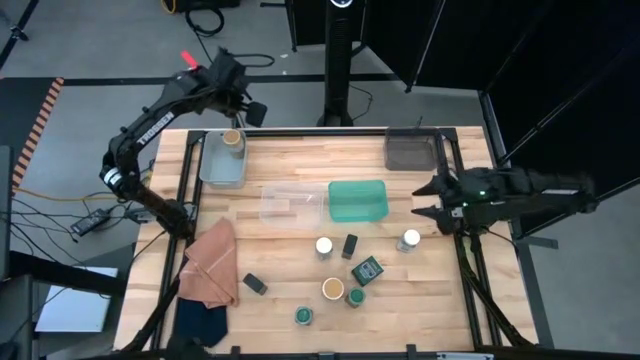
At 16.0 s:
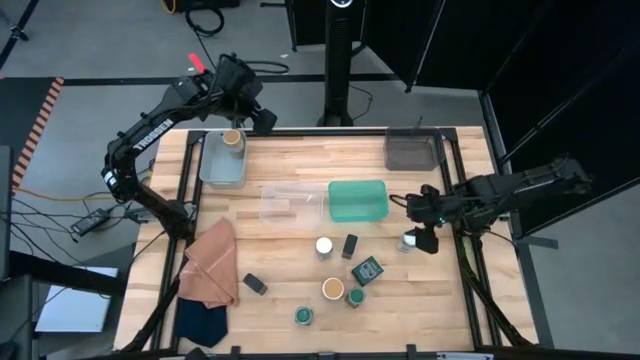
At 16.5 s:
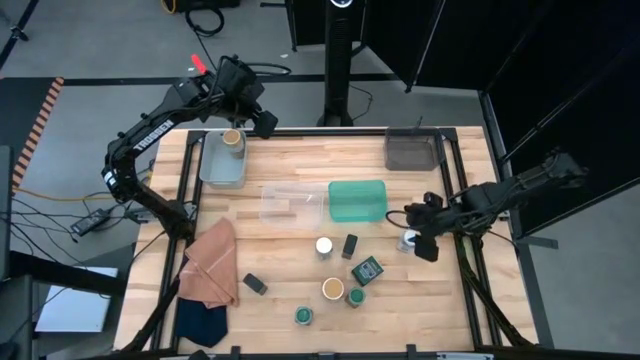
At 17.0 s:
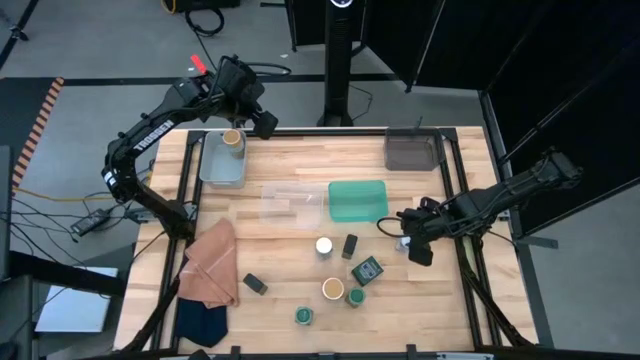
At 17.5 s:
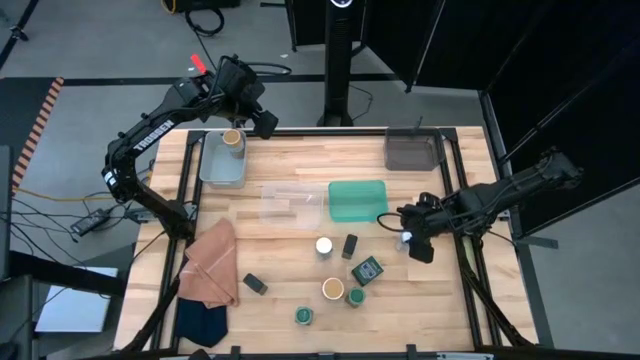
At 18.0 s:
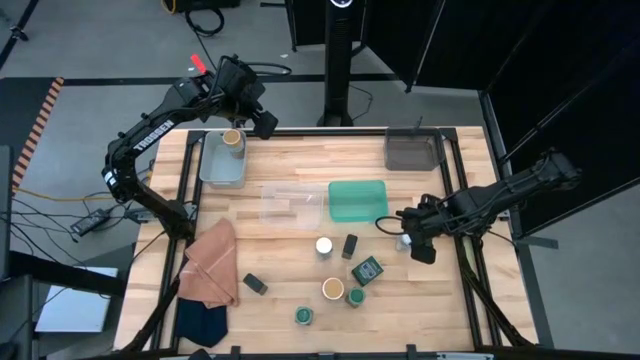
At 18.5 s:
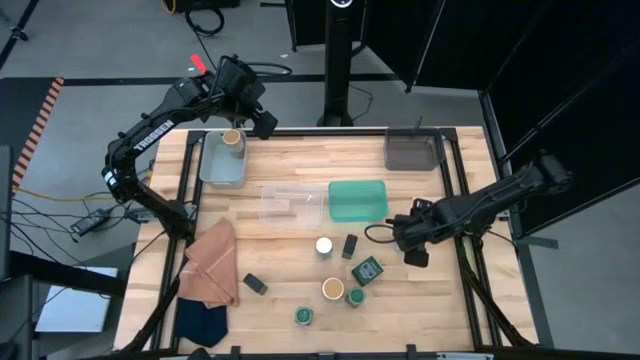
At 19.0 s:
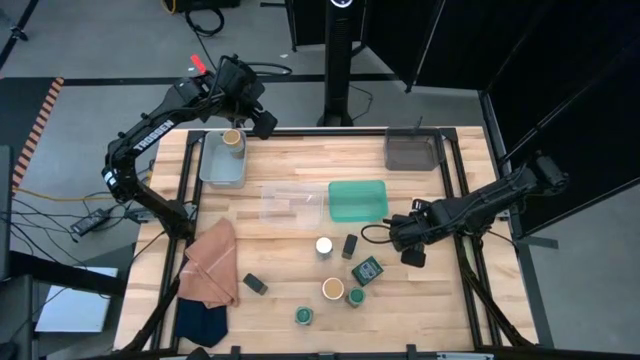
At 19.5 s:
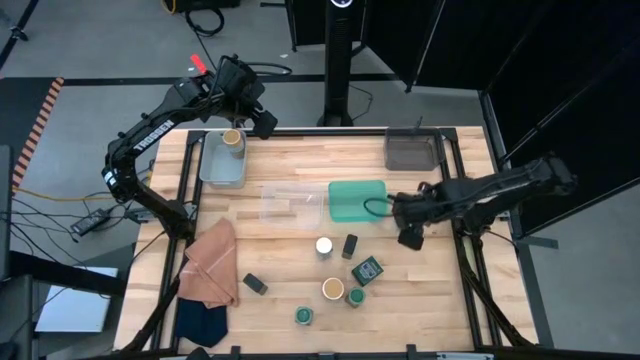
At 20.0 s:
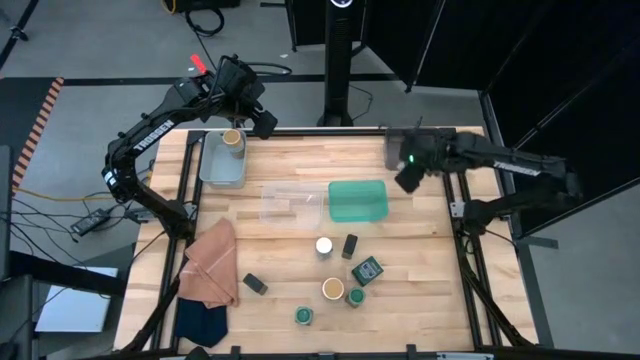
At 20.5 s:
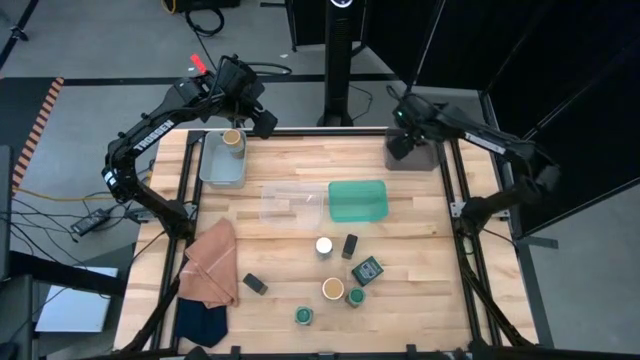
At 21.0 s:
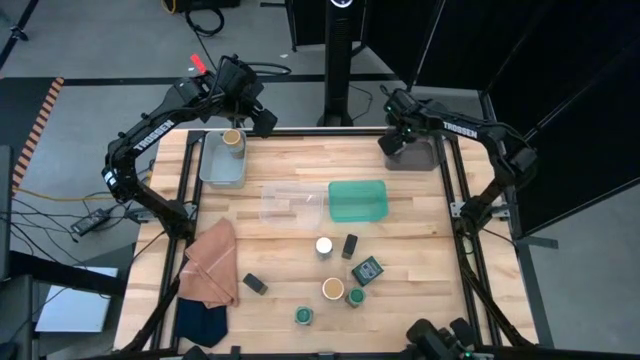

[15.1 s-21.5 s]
Task: Sort spices by type
Put the right white seasoning bottle into the black bin

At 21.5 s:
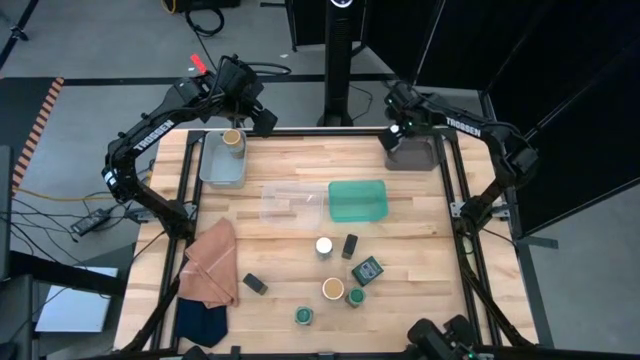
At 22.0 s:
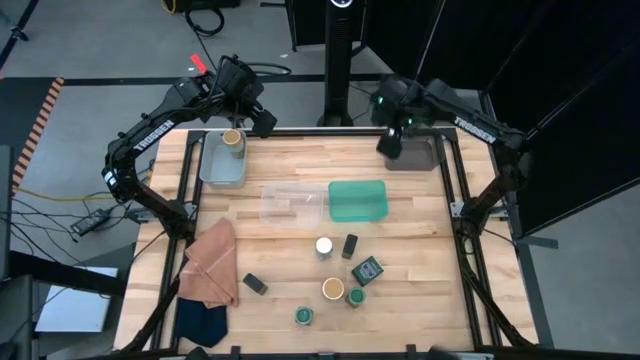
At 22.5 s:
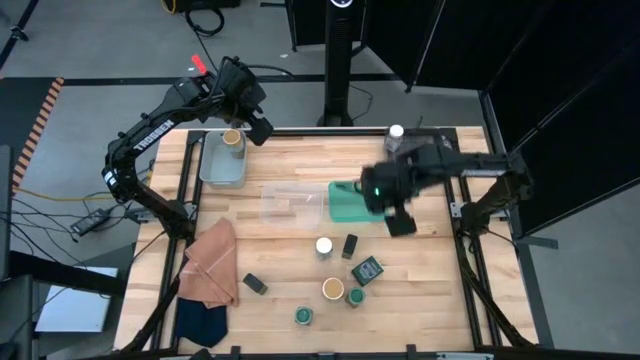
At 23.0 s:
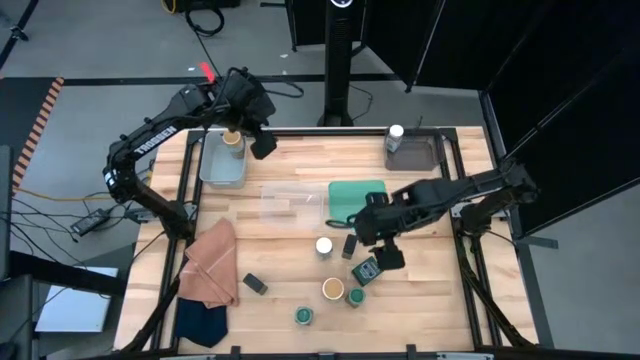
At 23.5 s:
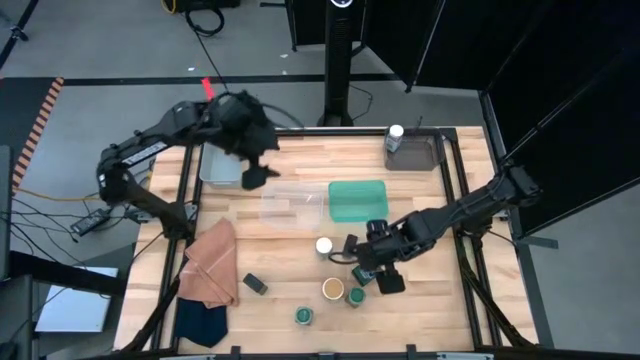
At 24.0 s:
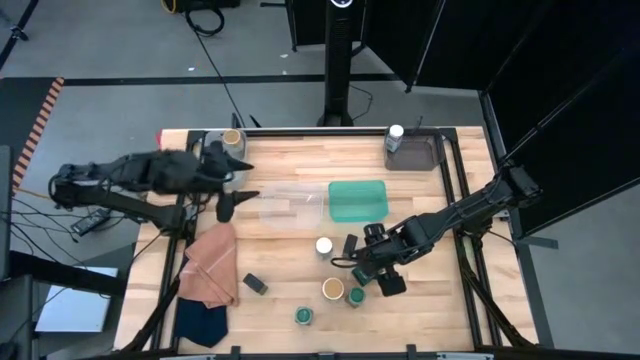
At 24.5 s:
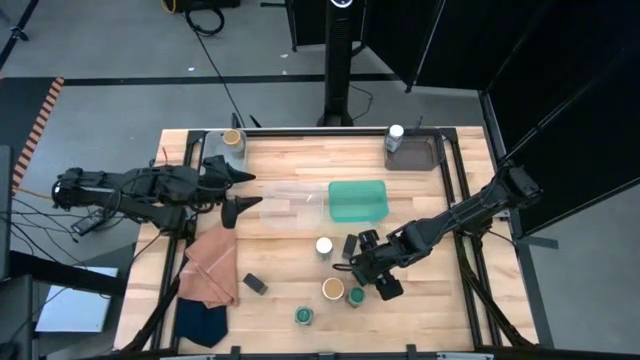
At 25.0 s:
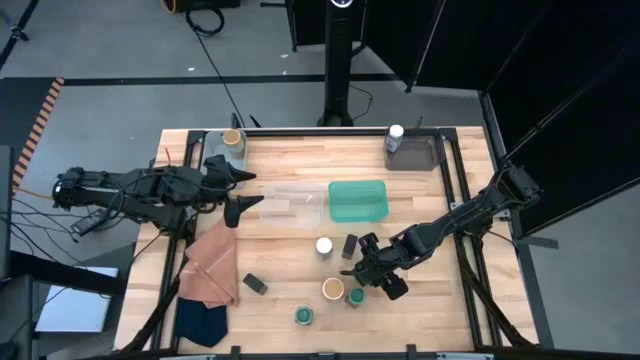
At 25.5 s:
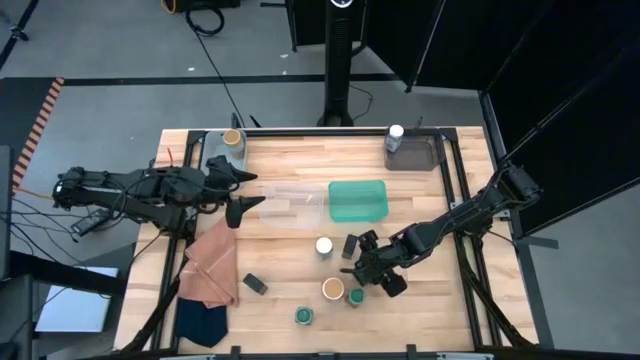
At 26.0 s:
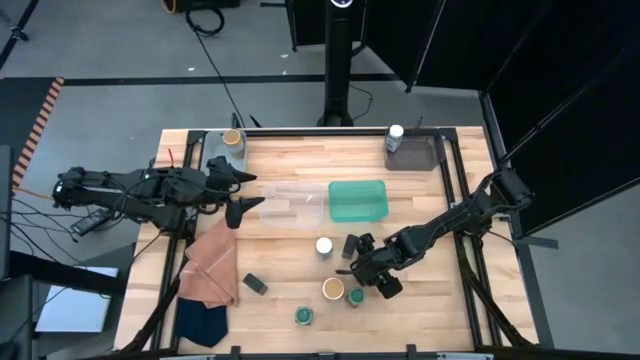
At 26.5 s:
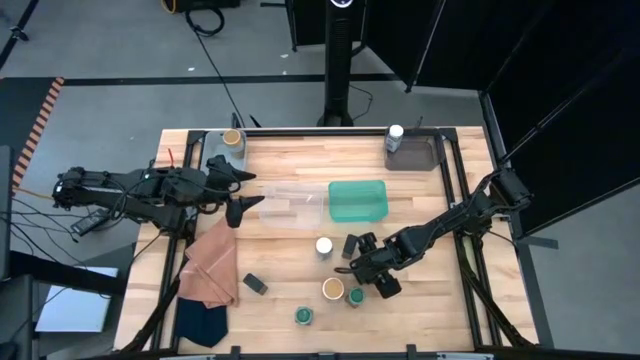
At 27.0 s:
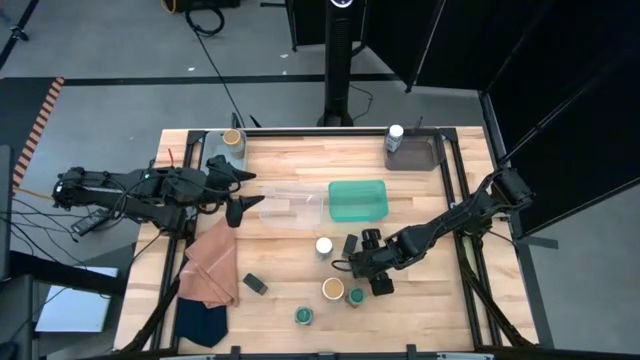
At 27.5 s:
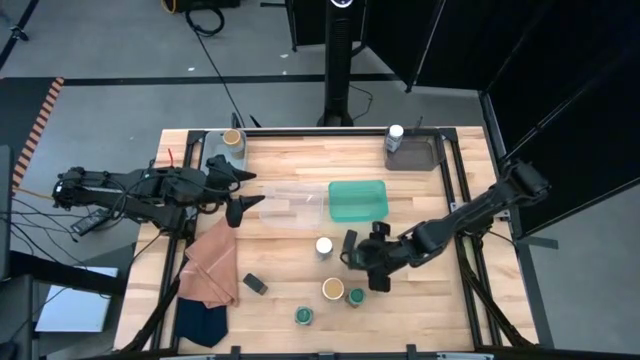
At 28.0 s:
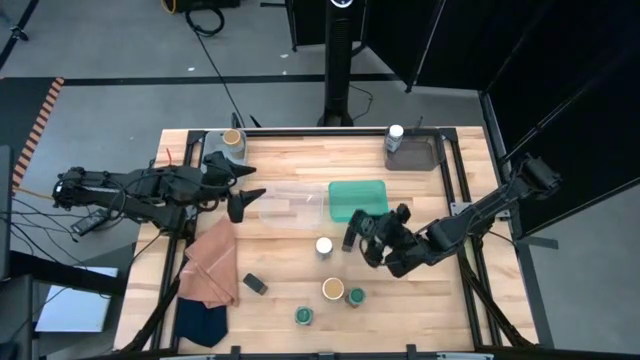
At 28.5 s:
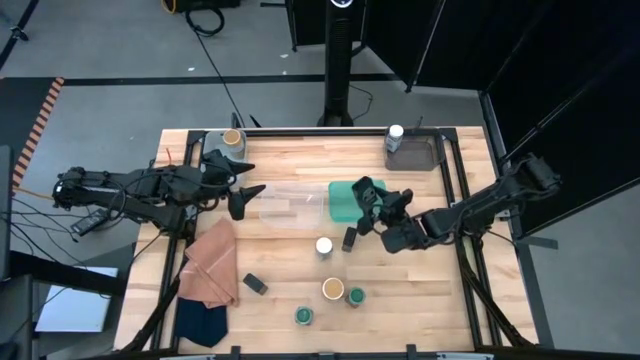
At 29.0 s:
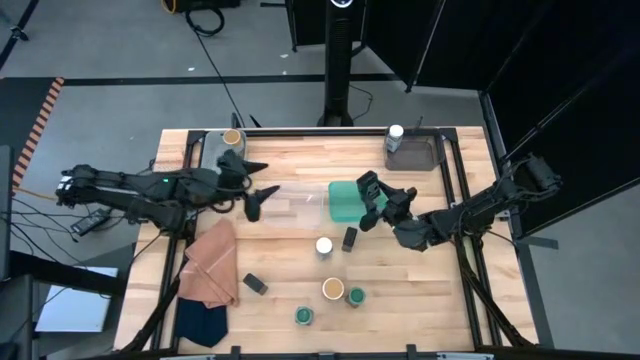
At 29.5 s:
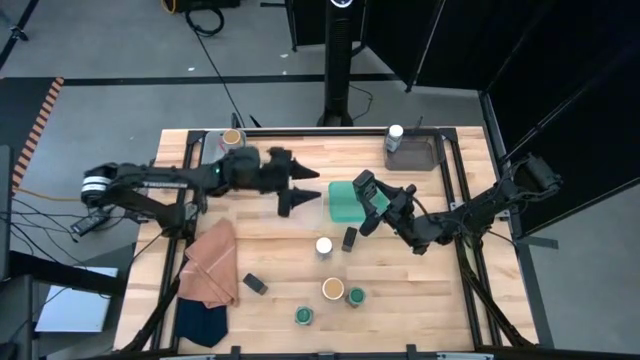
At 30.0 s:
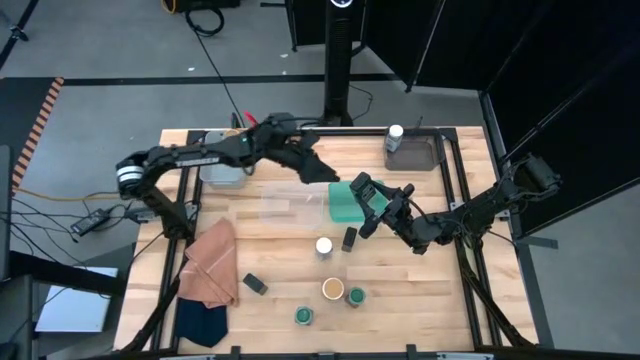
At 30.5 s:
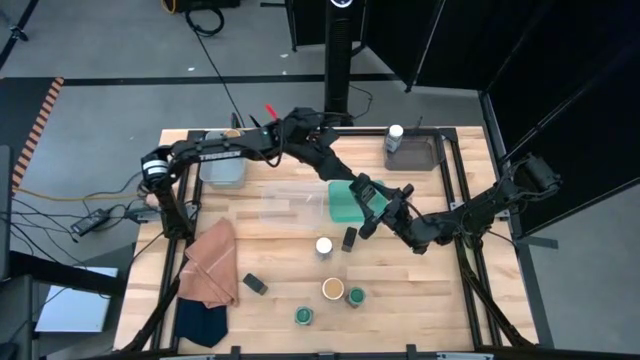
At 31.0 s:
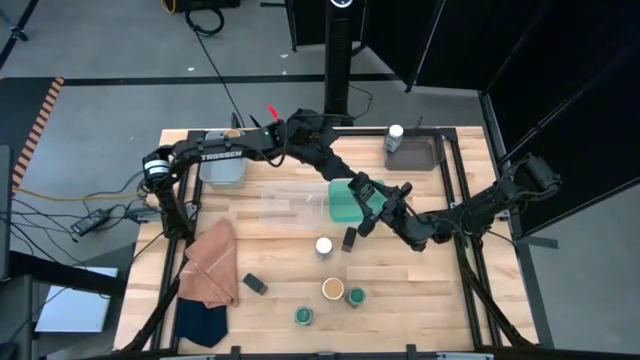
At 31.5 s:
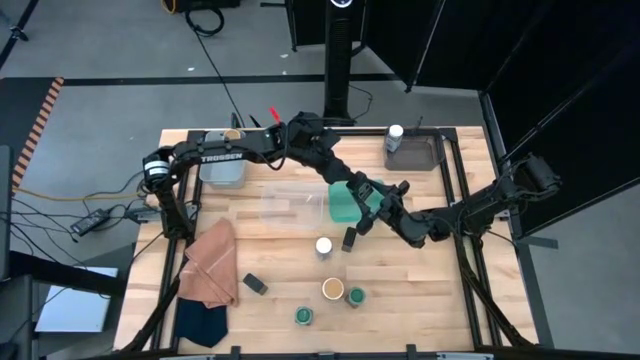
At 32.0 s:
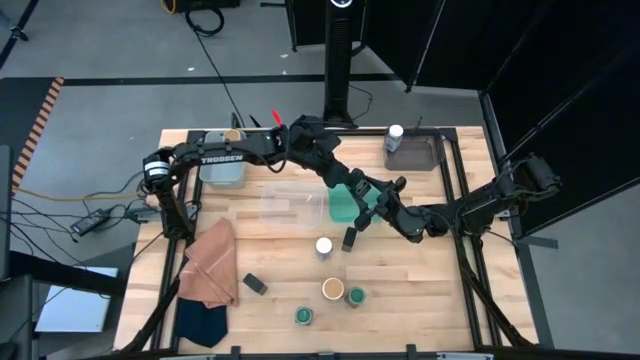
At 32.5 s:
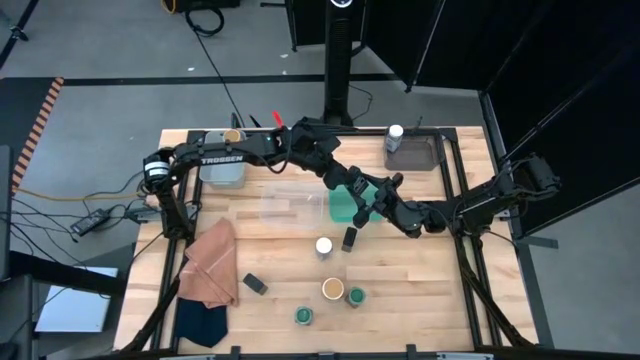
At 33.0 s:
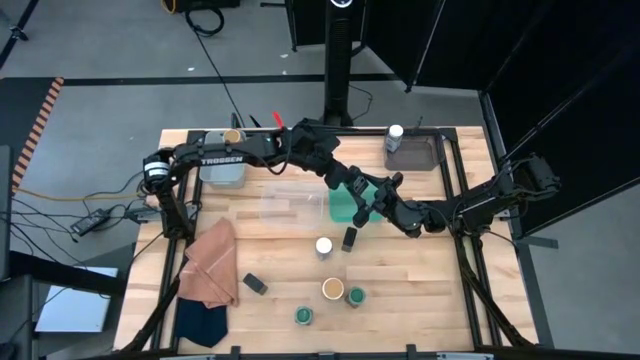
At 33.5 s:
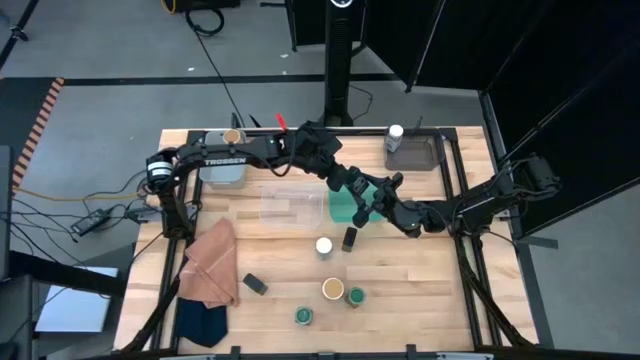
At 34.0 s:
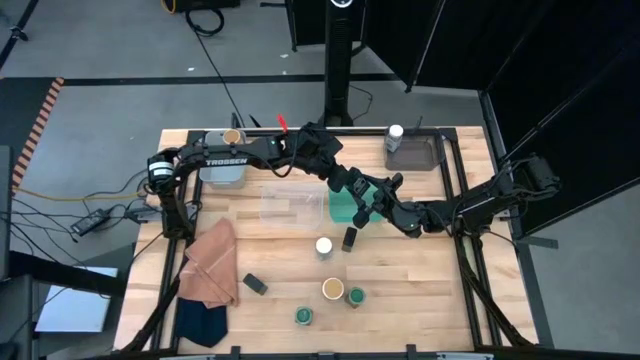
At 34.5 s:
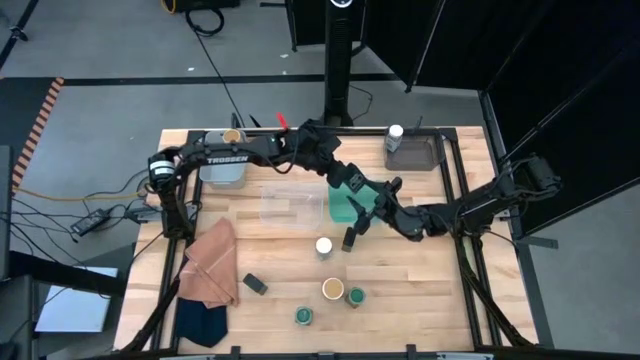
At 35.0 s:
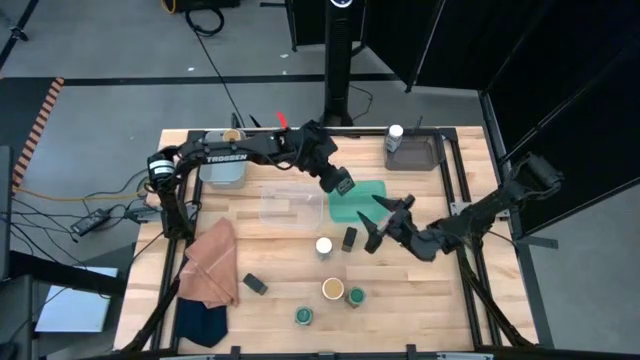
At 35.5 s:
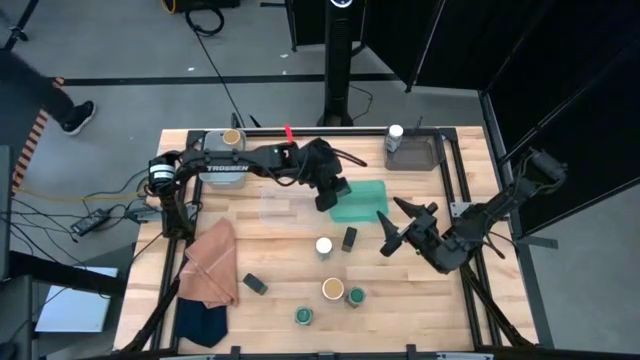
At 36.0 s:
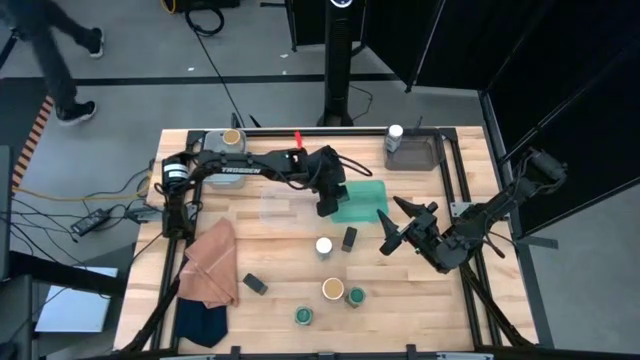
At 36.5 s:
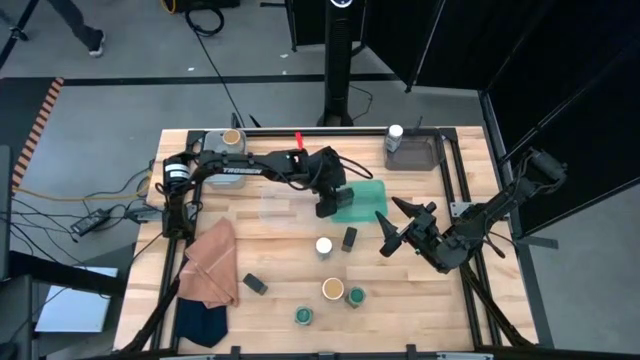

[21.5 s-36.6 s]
Put the bottom right green seasoning can into the green bin

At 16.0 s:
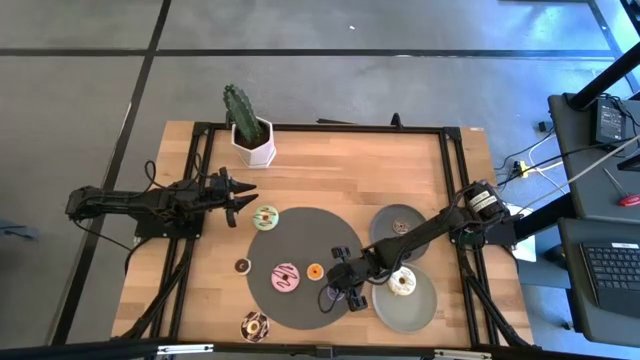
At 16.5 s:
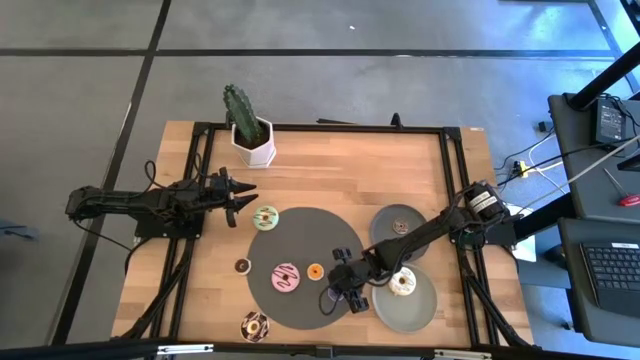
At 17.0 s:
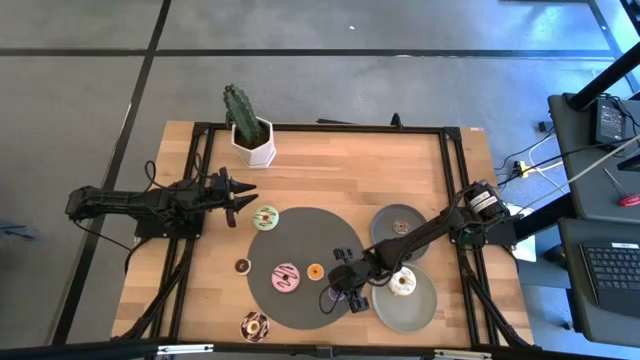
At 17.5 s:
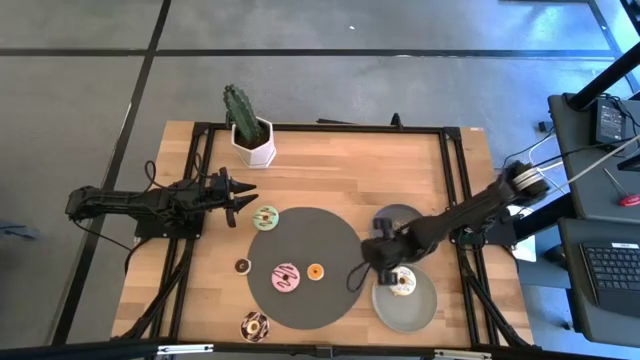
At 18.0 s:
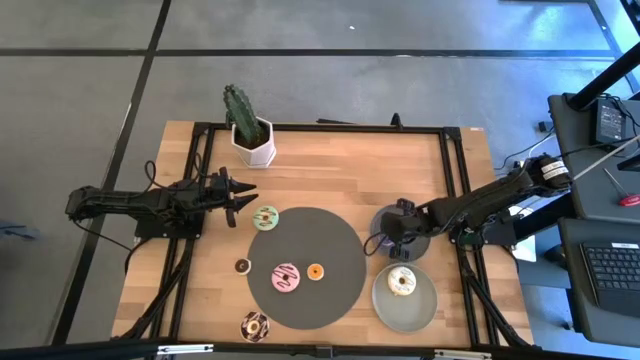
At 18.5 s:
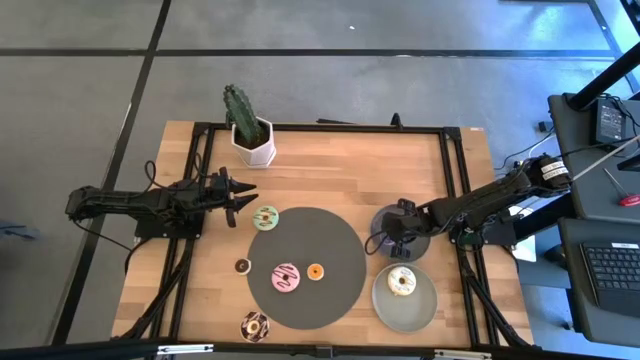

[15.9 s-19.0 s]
Task: Pick & Place donuts
Put the small blue donut on the dark gray plate
